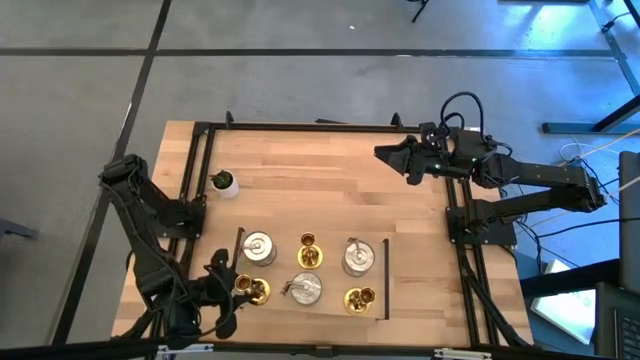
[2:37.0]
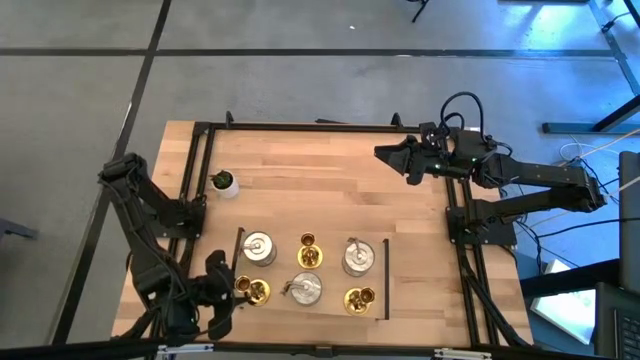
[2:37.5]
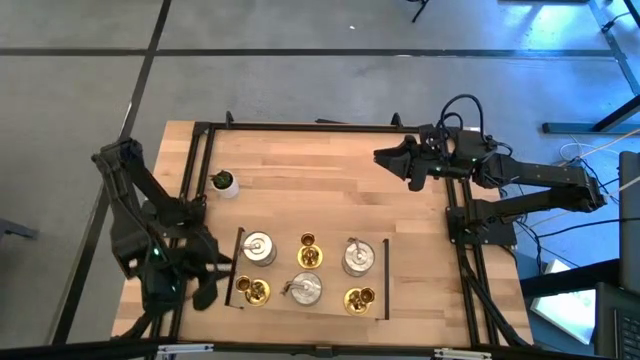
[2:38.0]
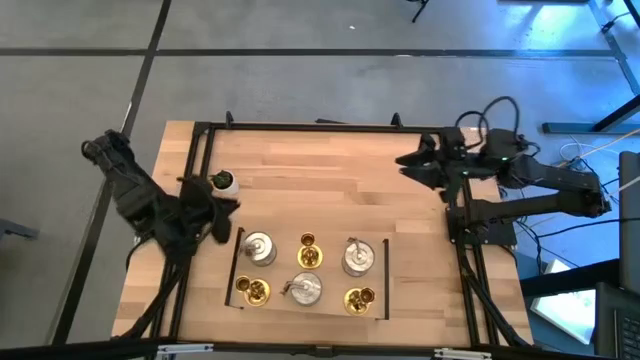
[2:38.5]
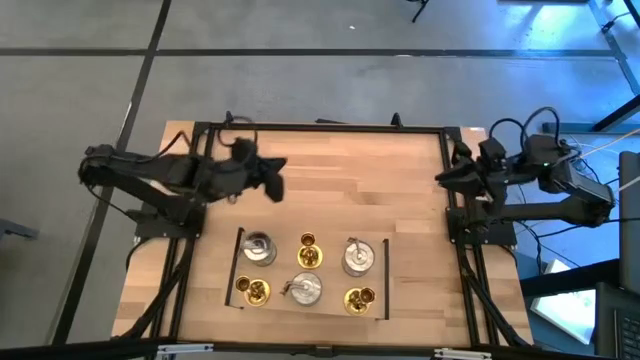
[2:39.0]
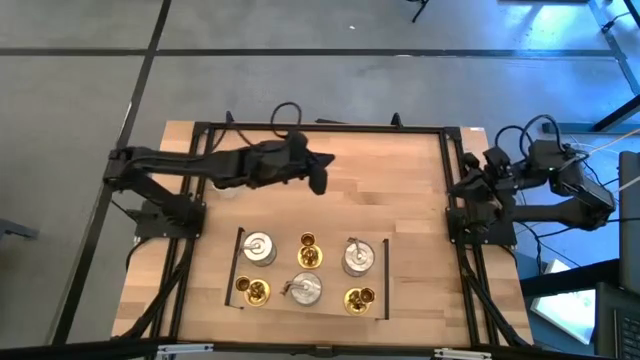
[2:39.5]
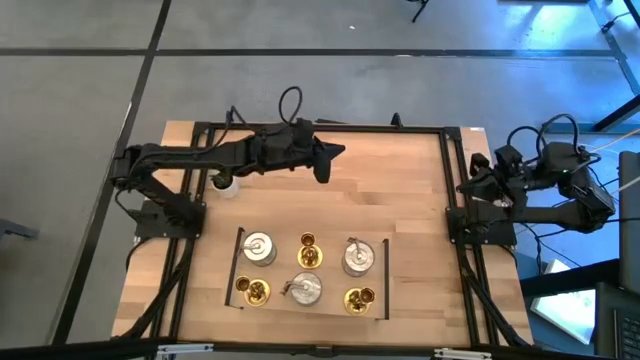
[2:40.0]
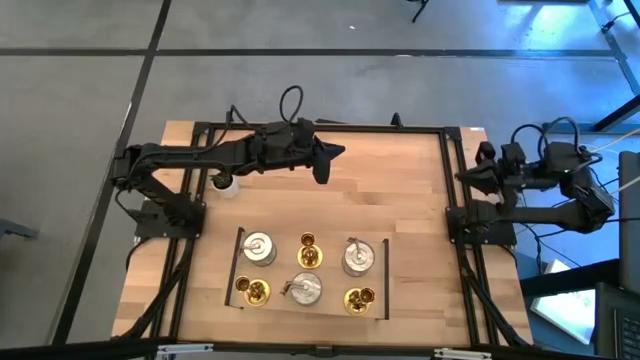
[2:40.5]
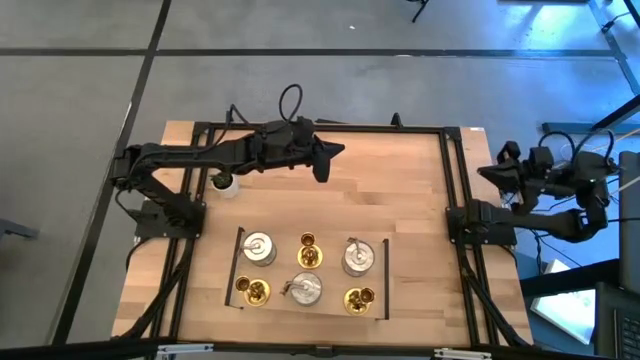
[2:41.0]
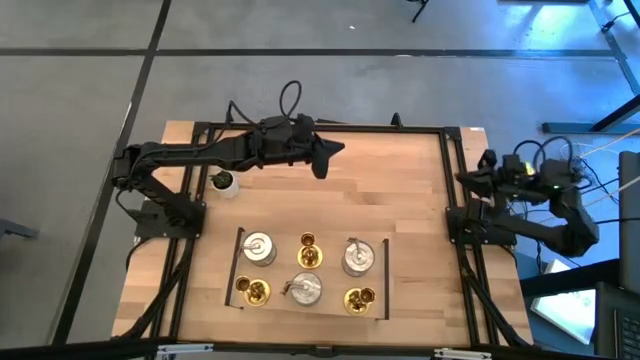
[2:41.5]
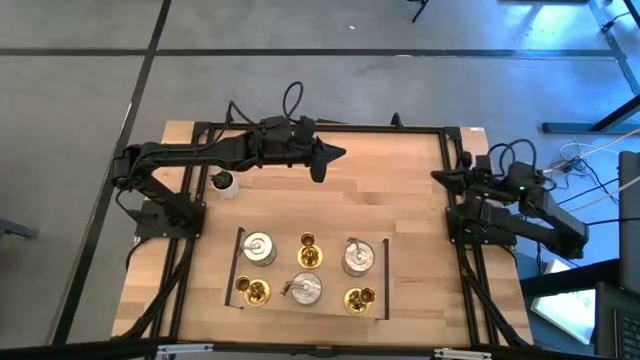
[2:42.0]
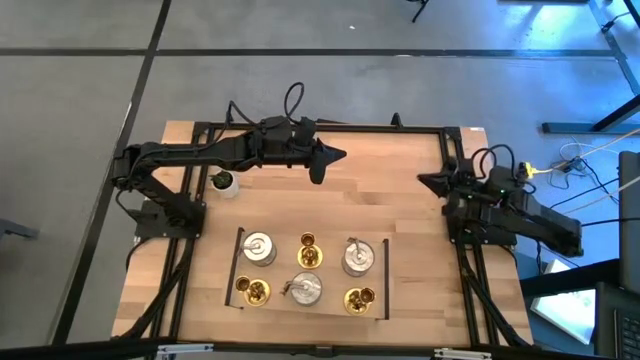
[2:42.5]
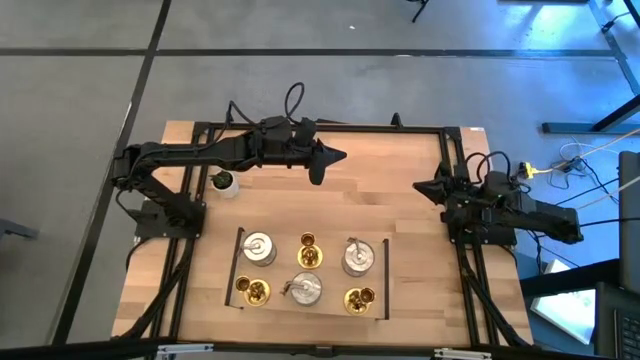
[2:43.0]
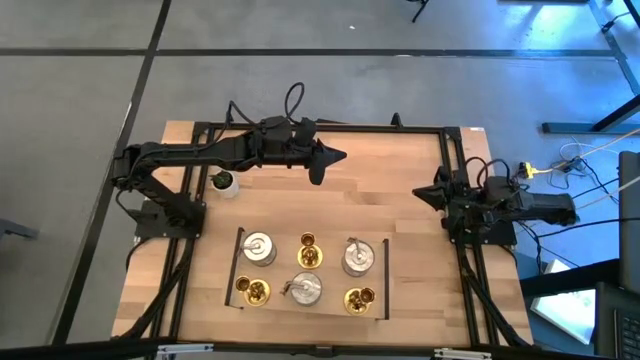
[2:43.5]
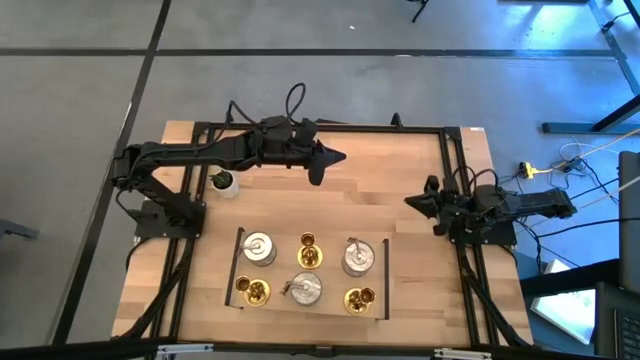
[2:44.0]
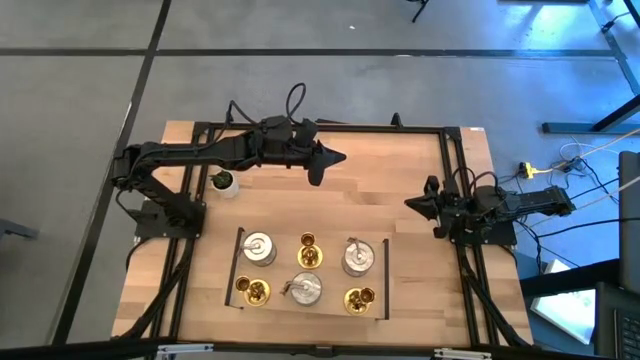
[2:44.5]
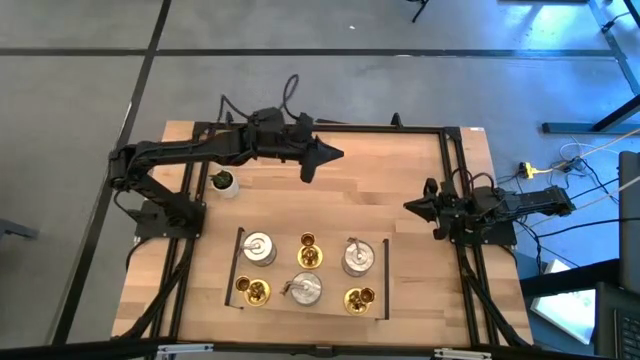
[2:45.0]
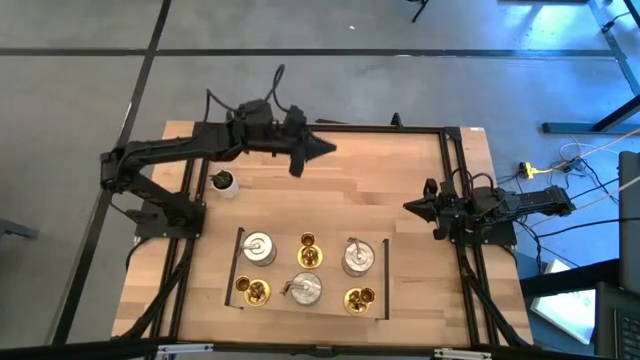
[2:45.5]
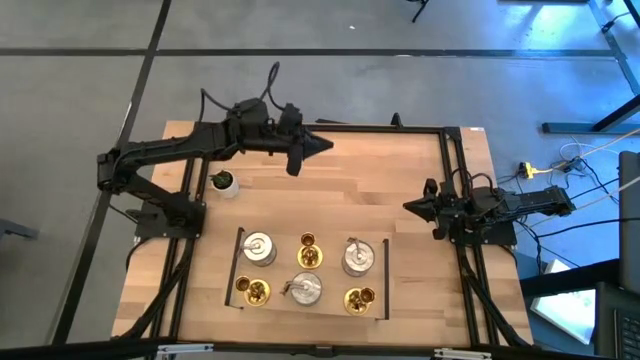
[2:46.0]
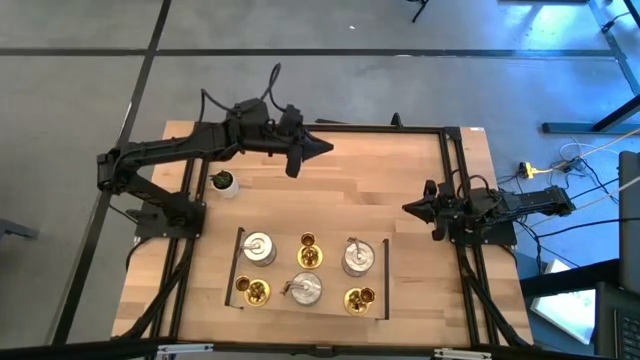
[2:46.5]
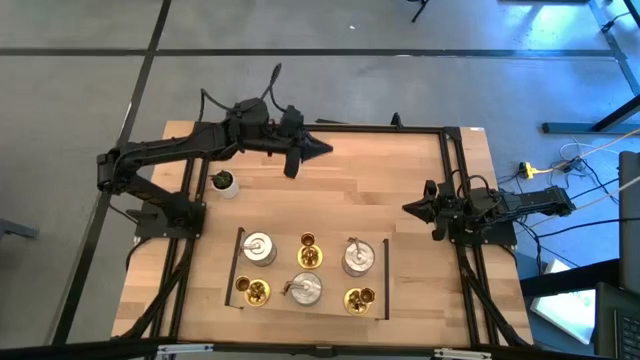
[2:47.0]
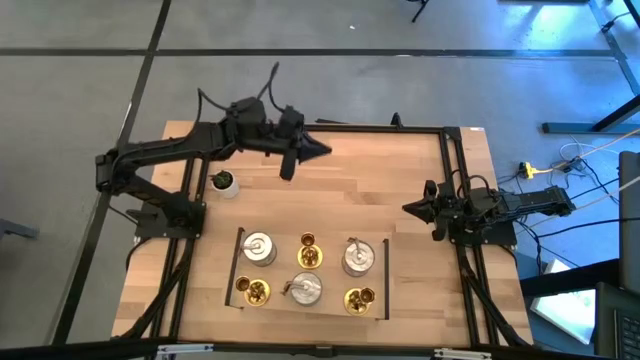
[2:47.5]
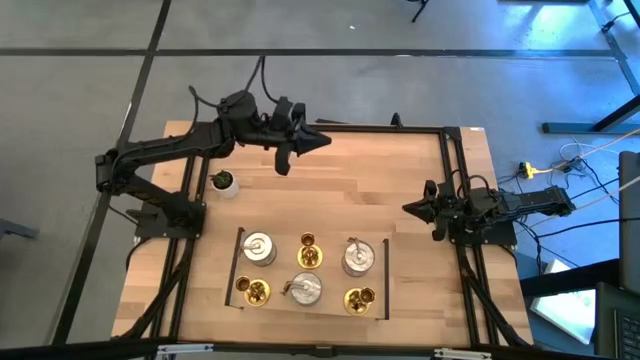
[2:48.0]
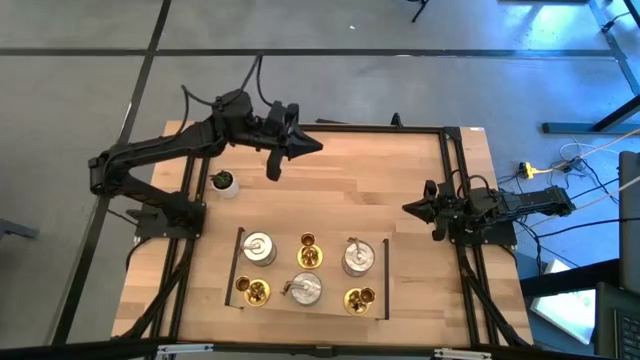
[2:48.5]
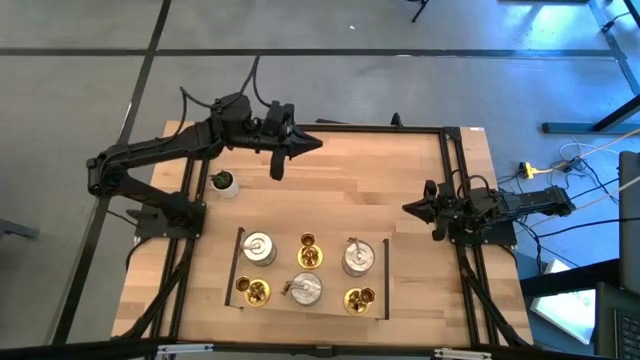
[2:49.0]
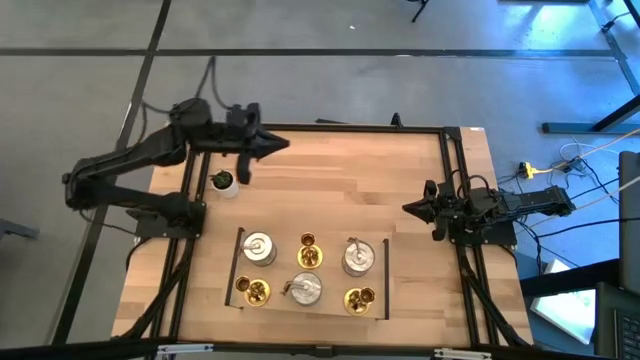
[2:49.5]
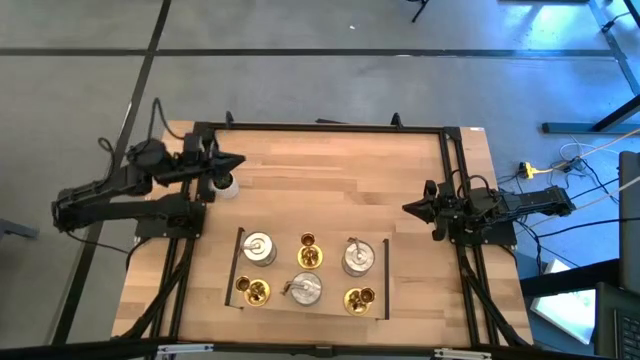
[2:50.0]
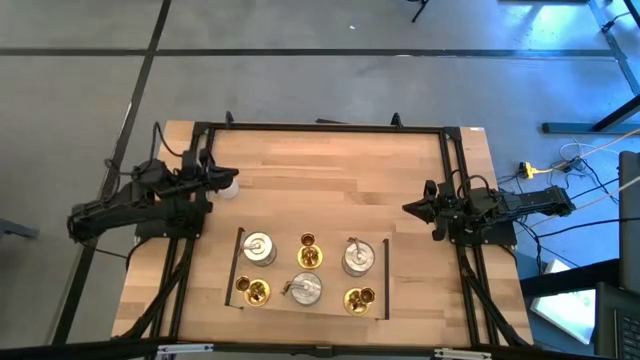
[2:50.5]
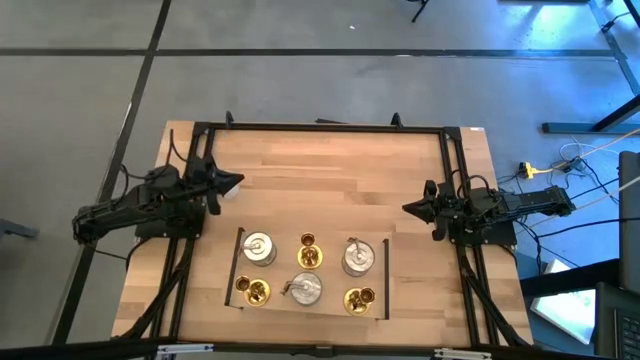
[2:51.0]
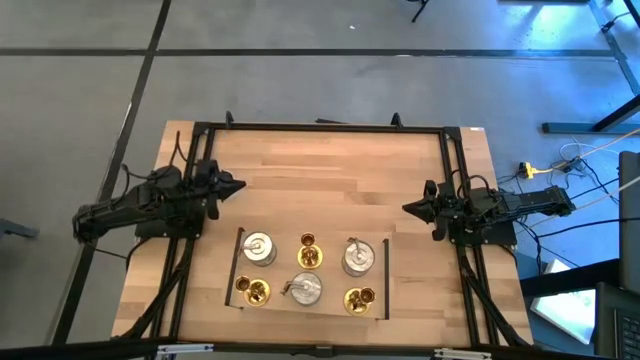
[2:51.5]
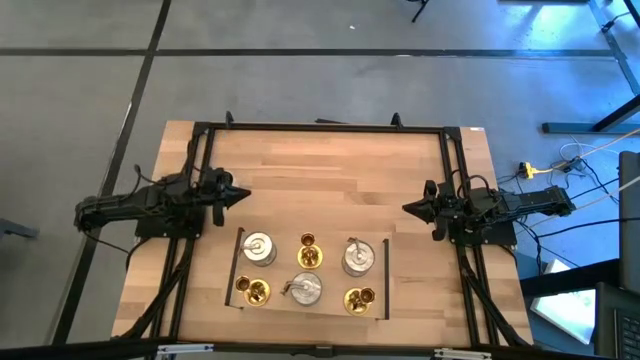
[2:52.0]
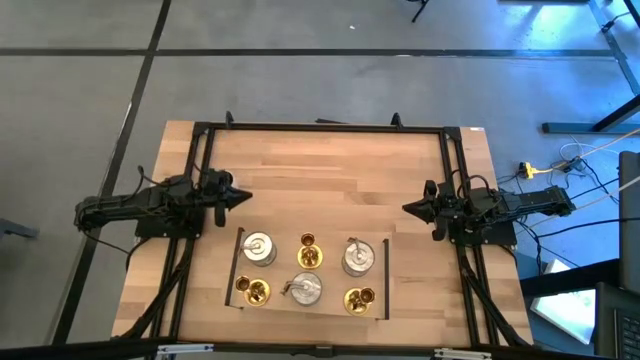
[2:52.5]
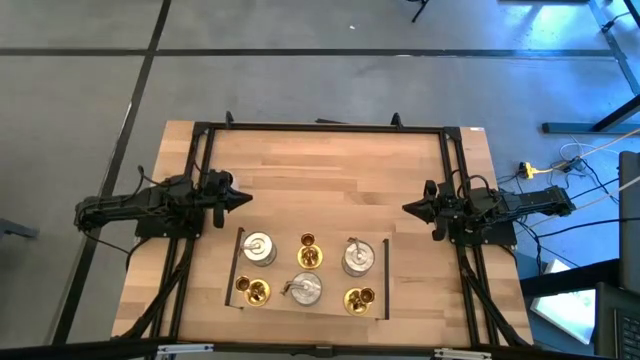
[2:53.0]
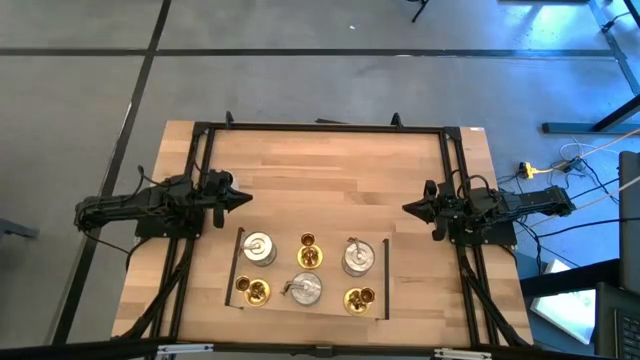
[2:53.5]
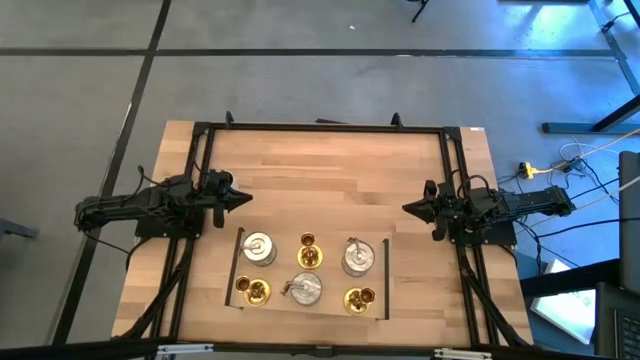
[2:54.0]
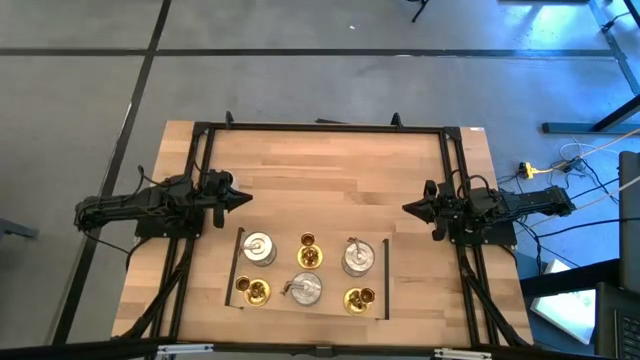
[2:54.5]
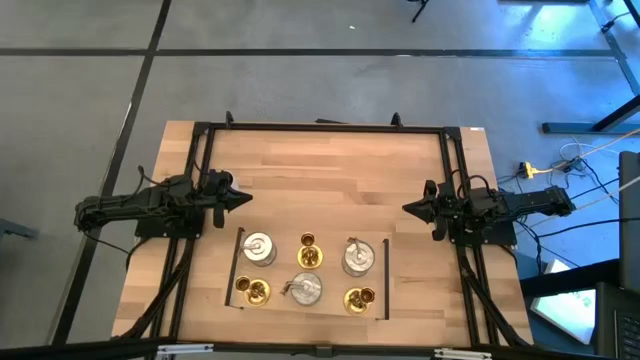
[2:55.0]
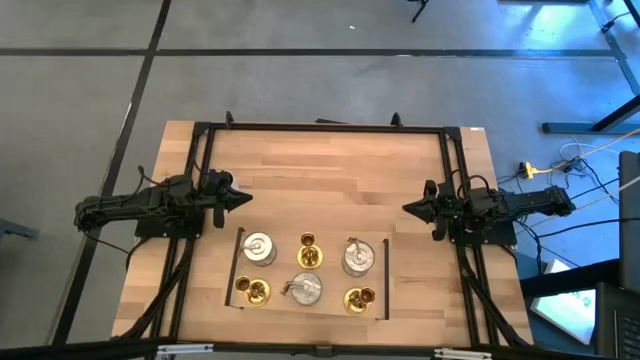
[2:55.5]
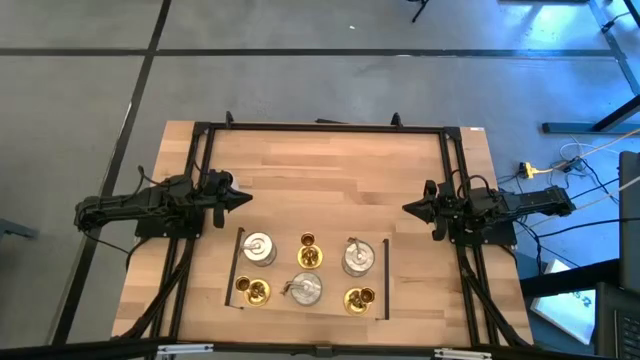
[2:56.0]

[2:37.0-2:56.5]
Task: Pick & Place candle stick holders
Return to Home Position

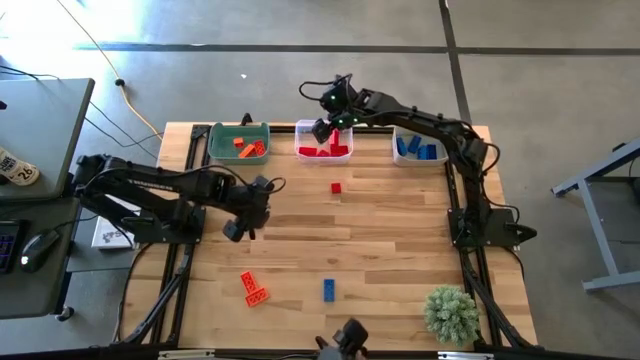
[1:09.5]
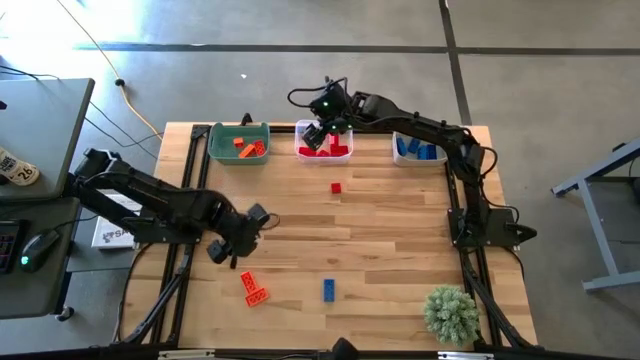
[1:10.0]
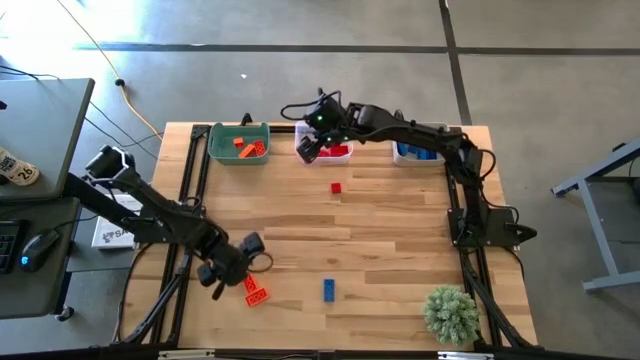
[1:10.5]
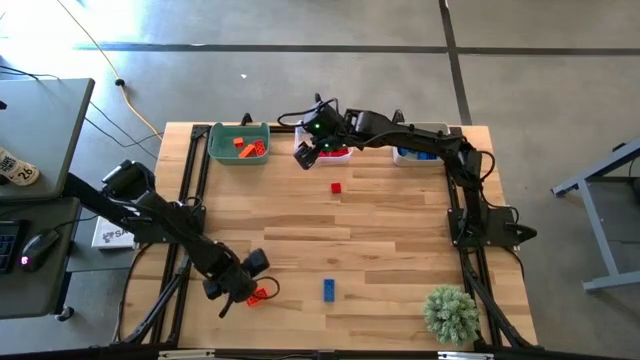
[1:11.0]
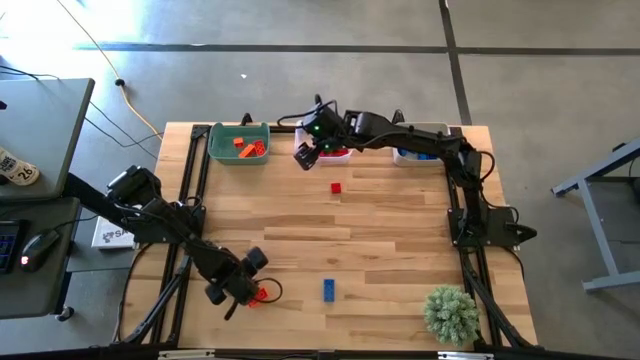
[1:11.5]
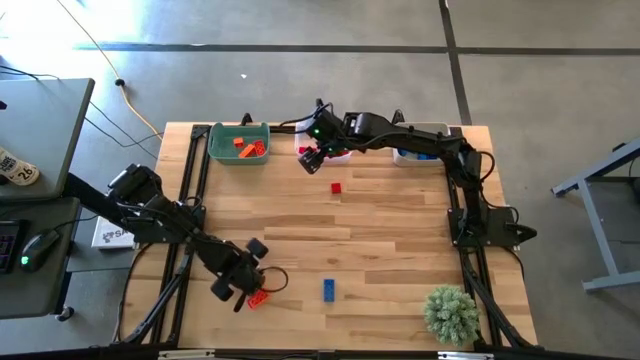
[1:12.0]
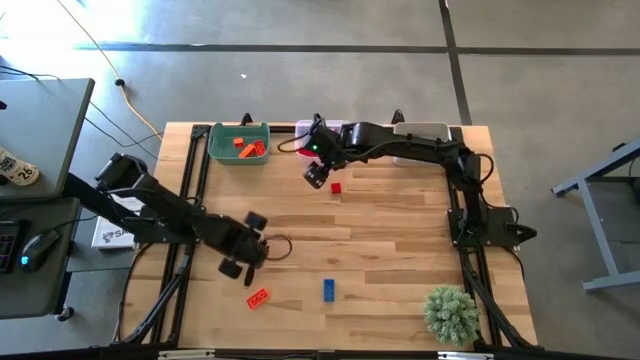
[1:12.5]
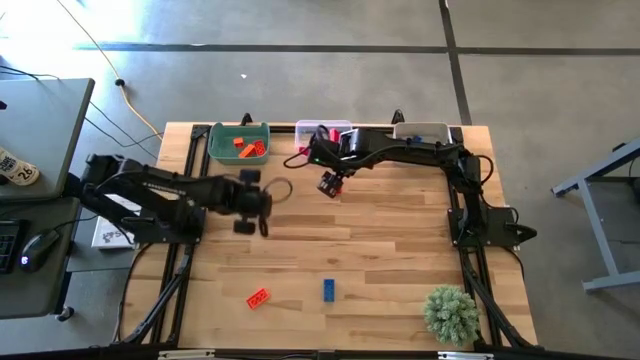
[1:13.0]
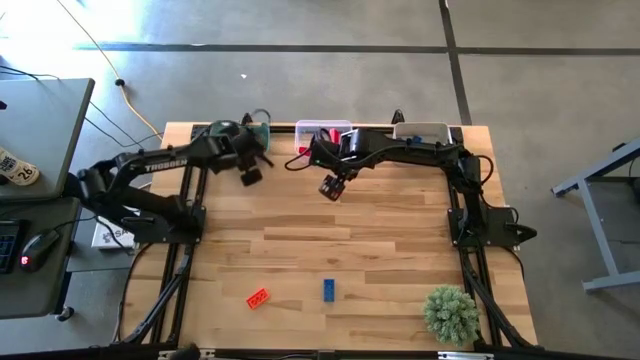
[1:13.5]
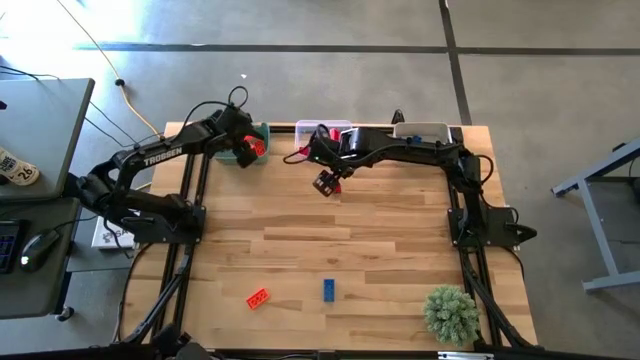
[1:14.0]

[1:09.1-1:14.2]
Task: Sort & place blocks by color
Put the orange game piece into the green bin
